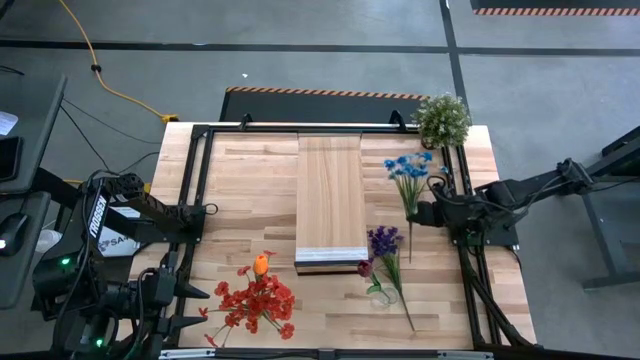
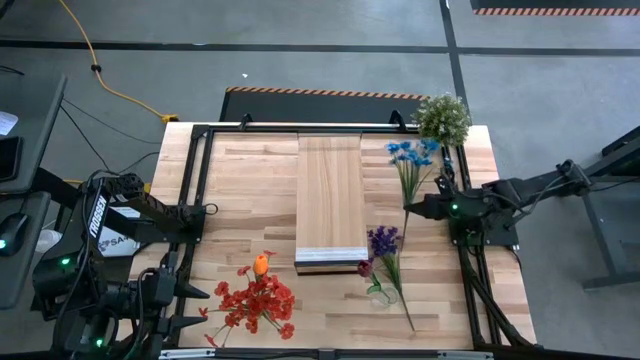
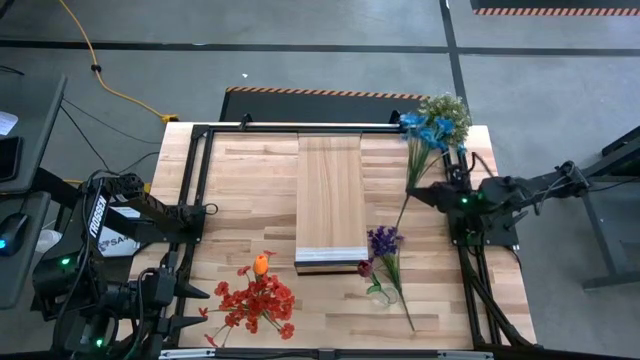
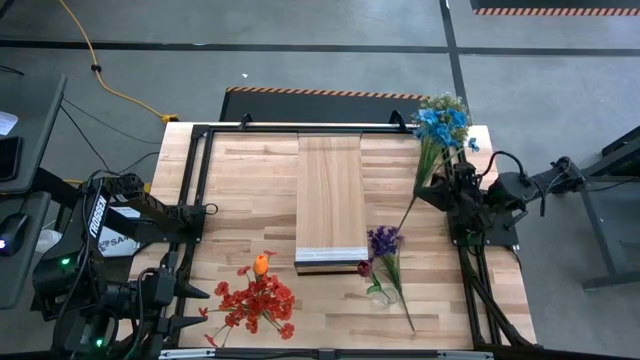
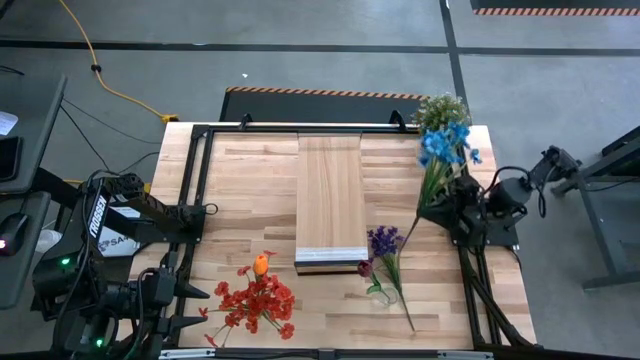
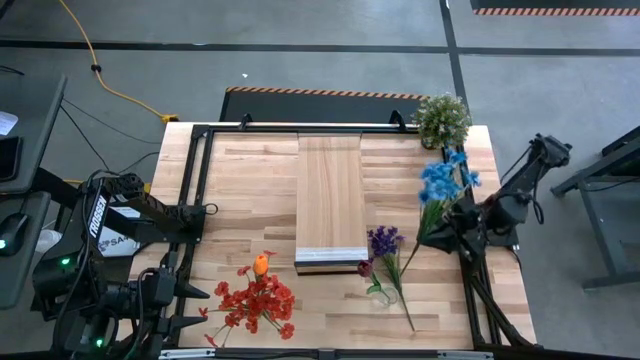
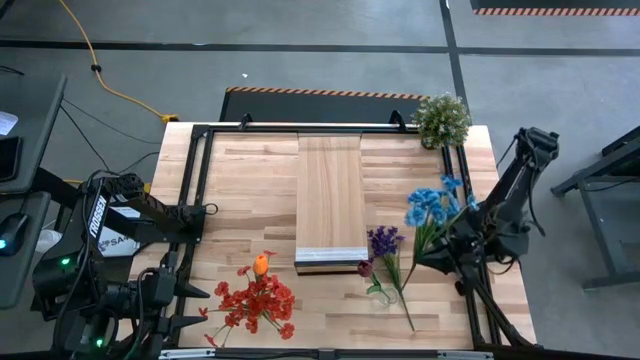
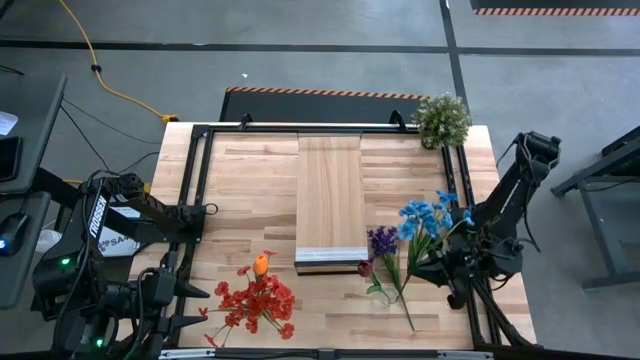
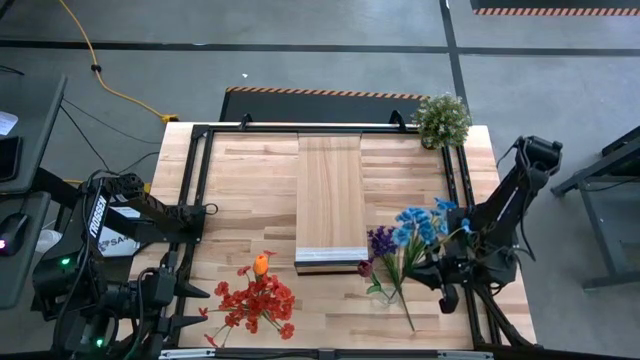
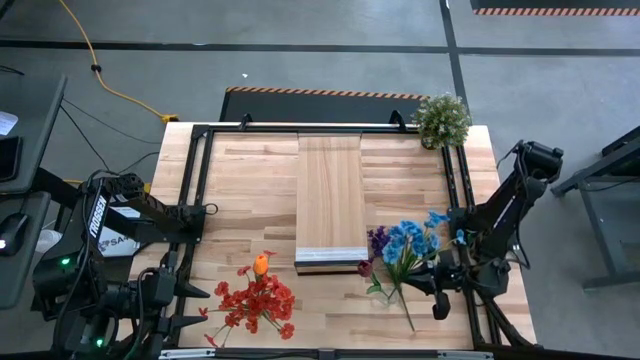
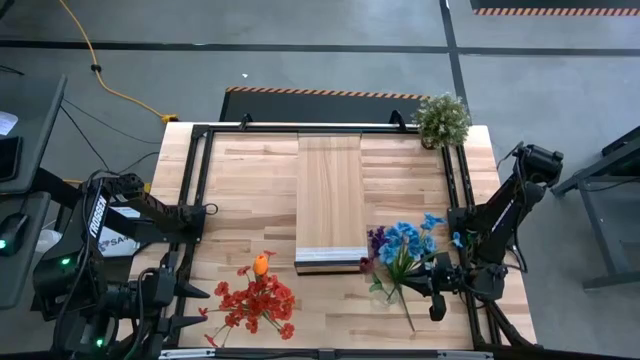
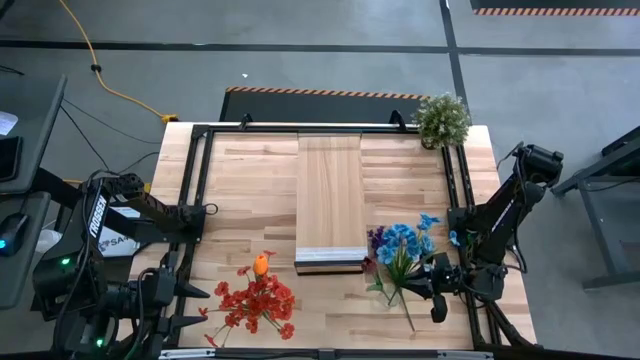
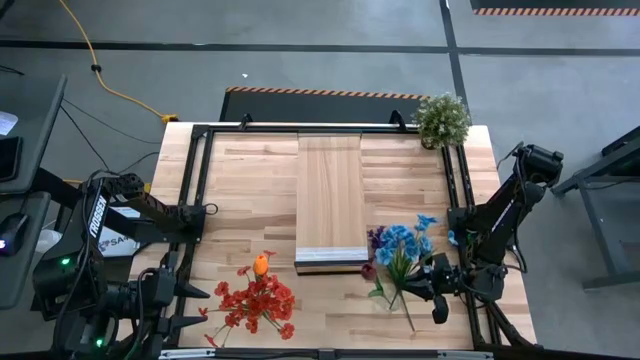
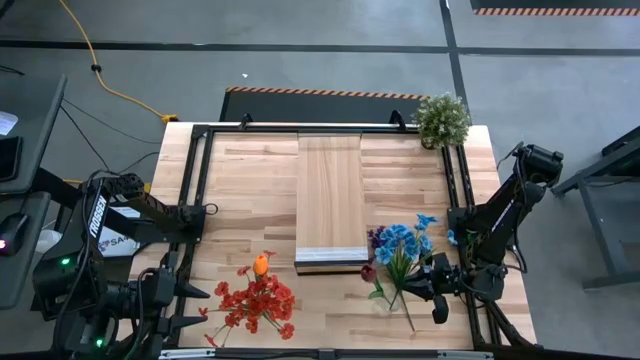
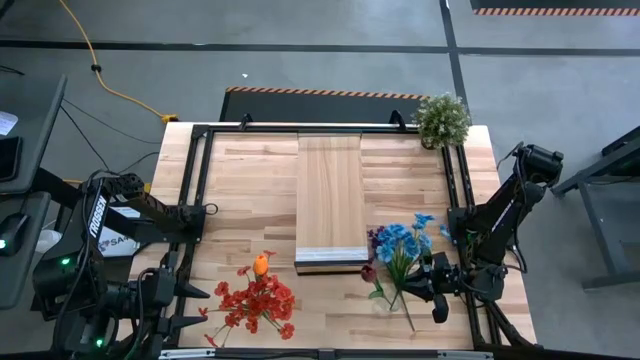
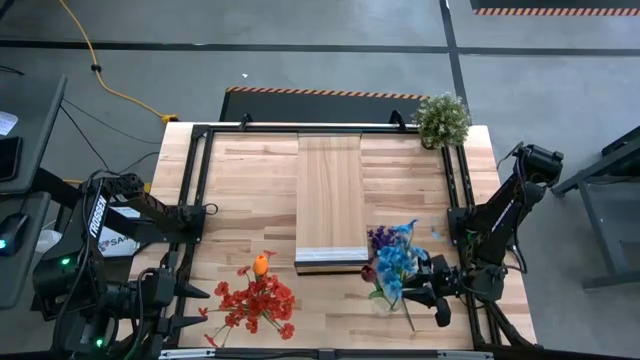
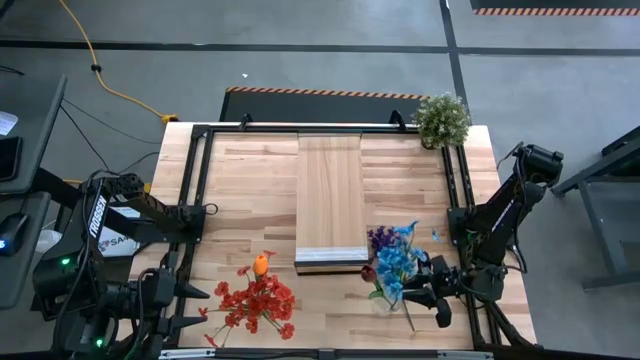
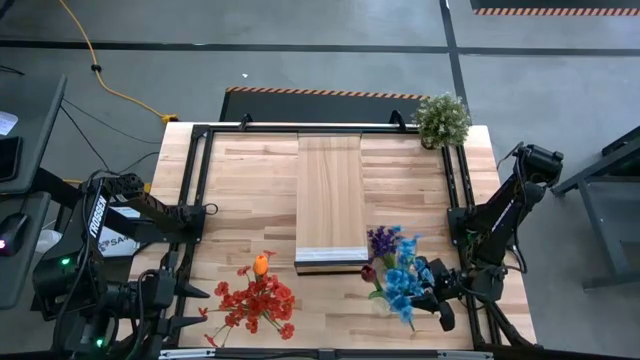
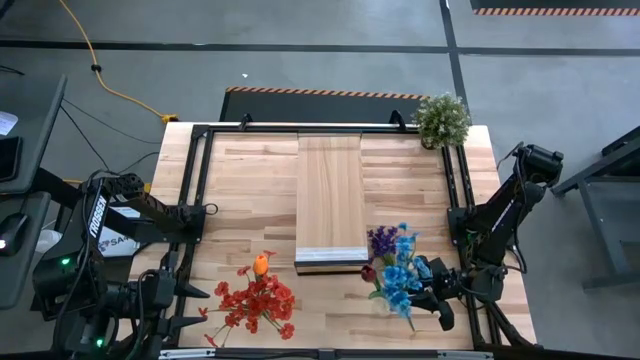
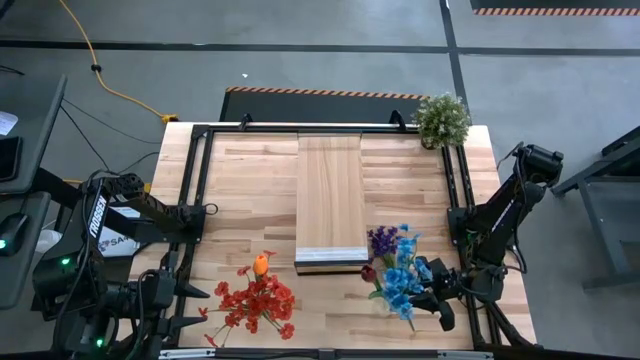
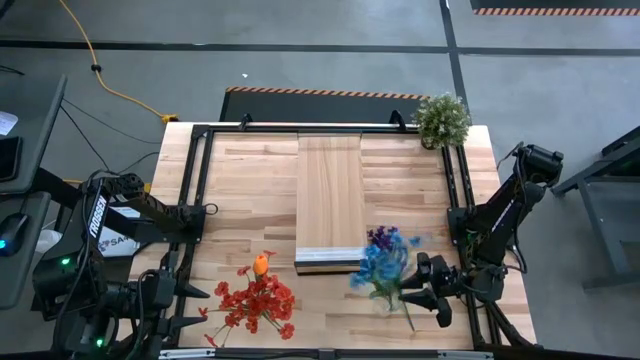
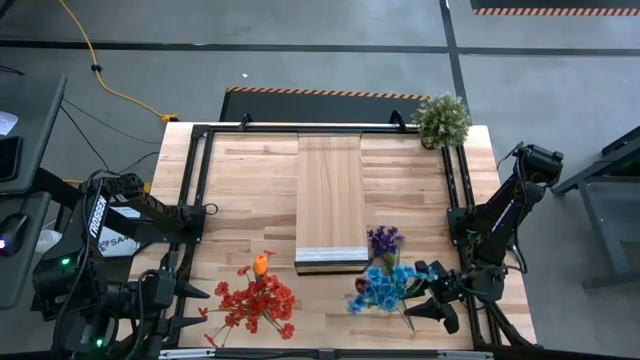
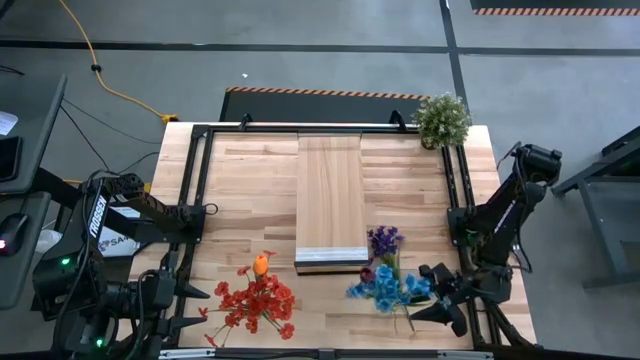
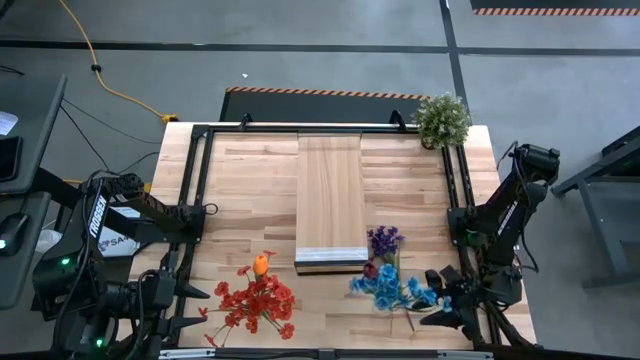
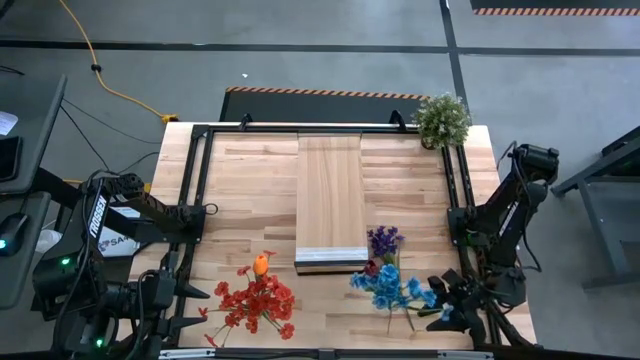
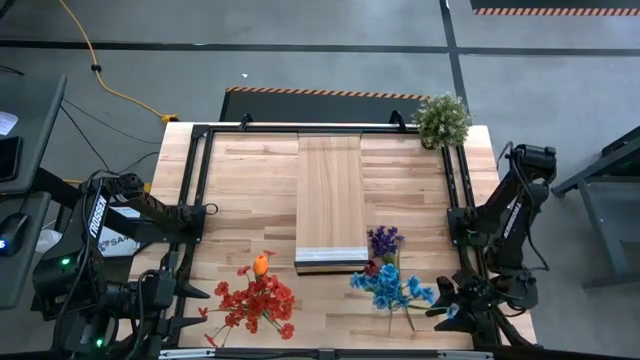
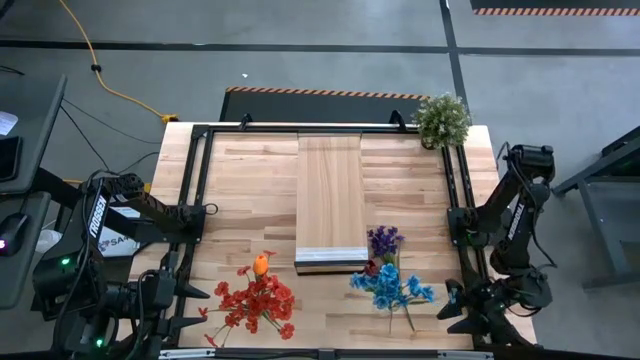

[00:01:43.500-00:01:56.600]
Task: Pick and place flowers into a vace then onto a shelf
Put the blue flowers into the right transparent vase

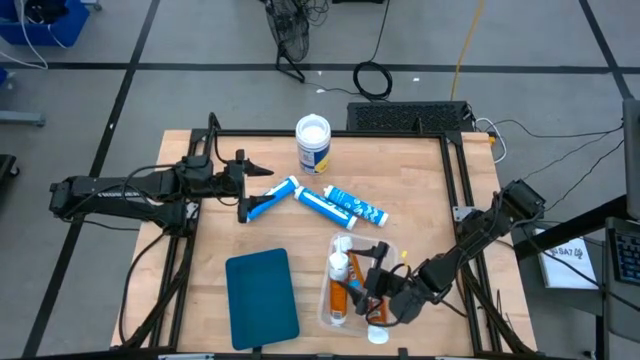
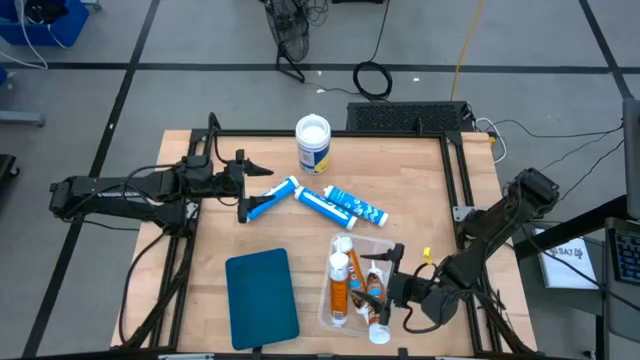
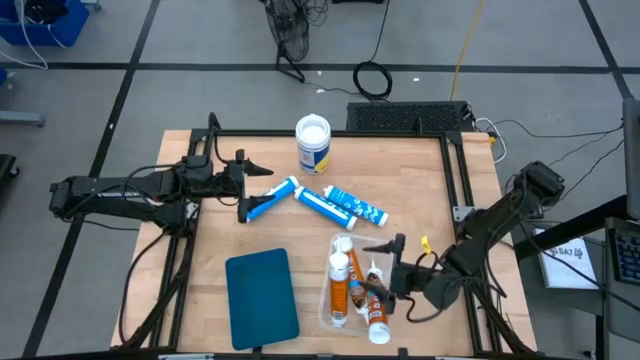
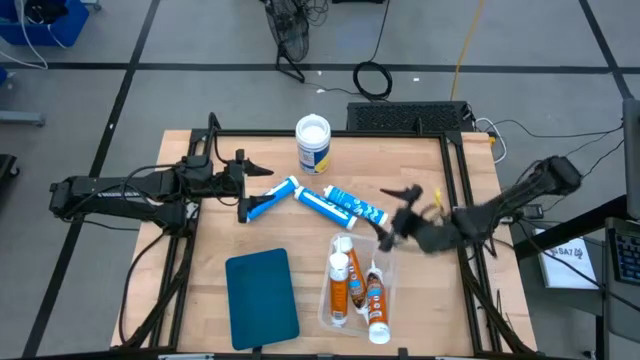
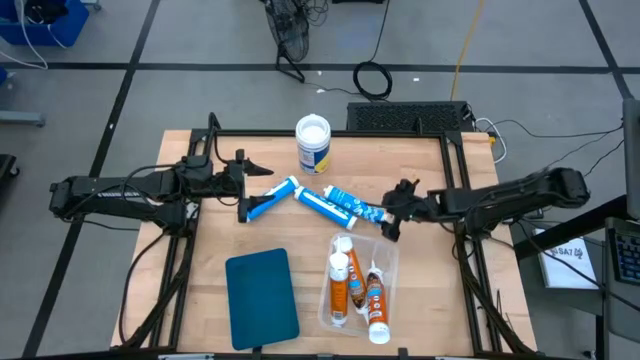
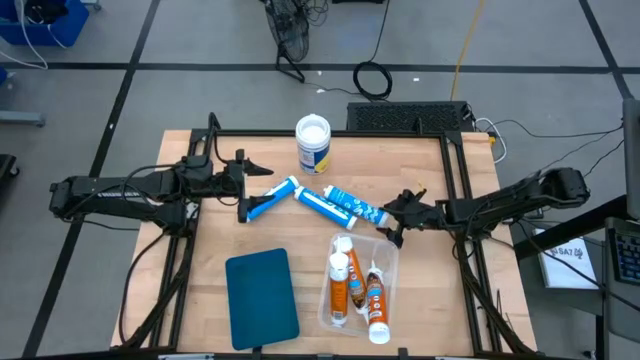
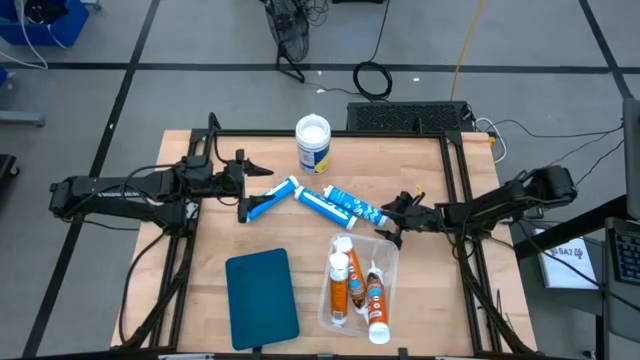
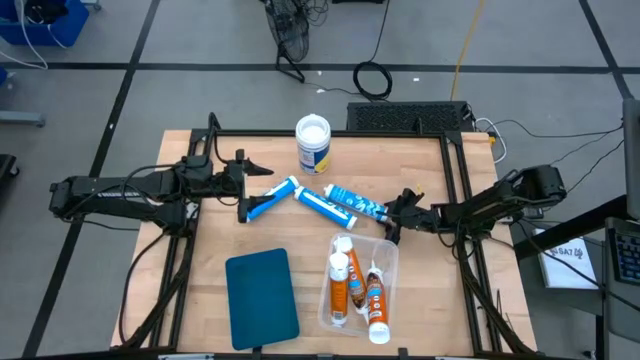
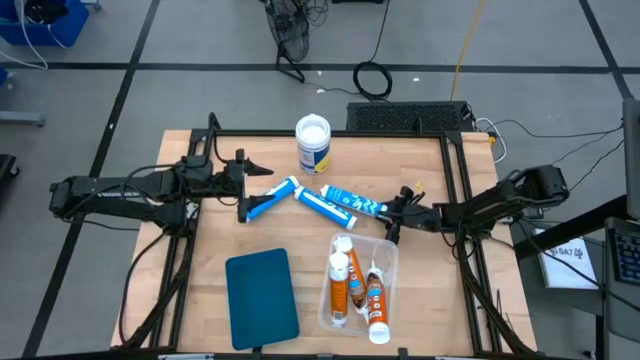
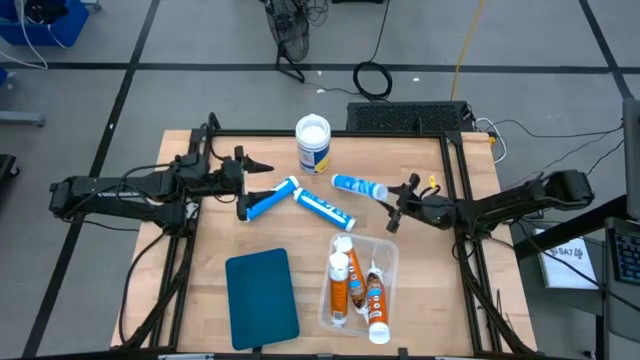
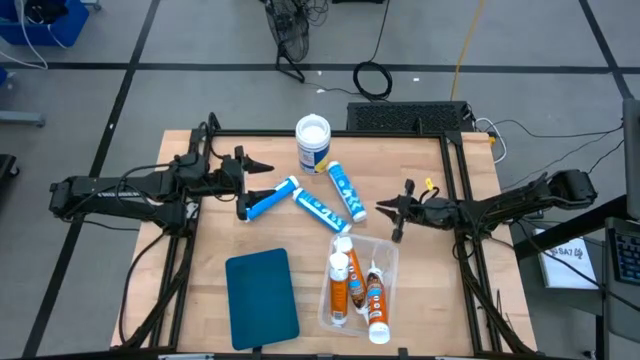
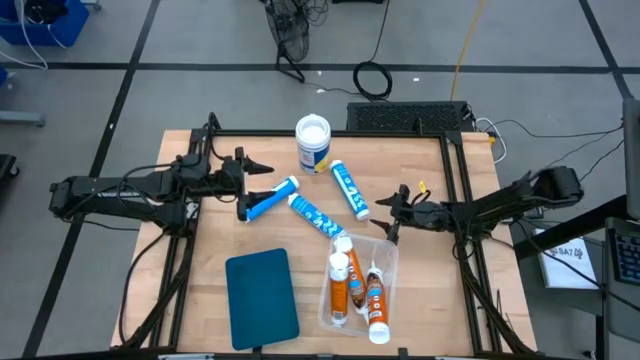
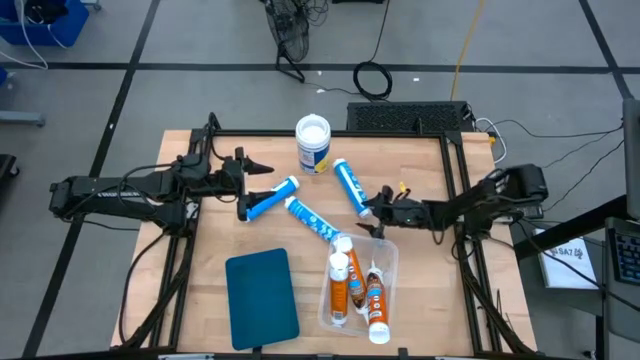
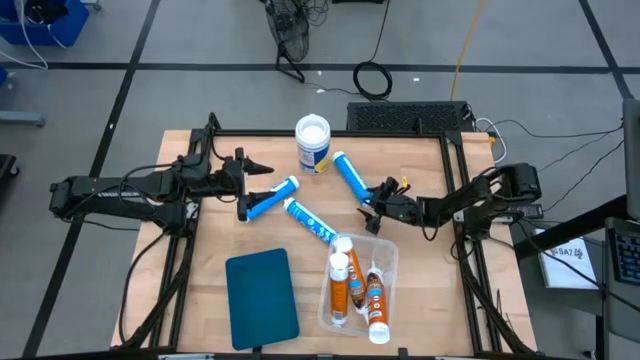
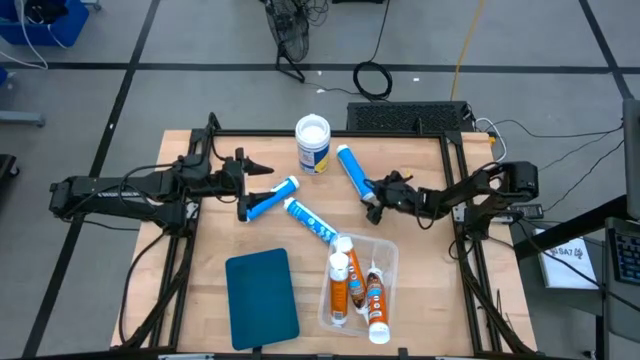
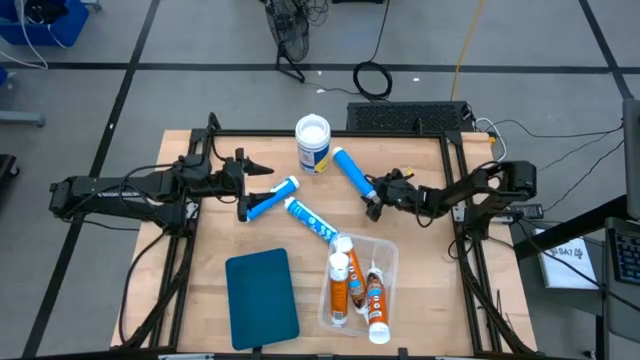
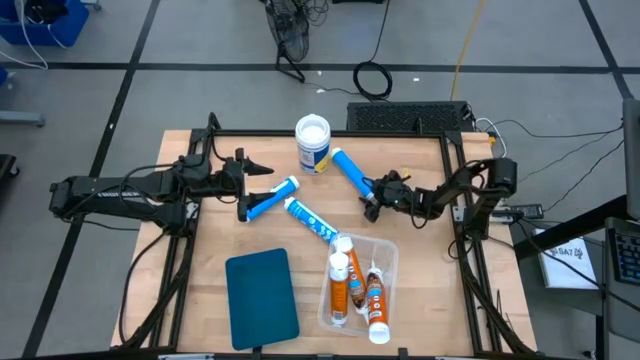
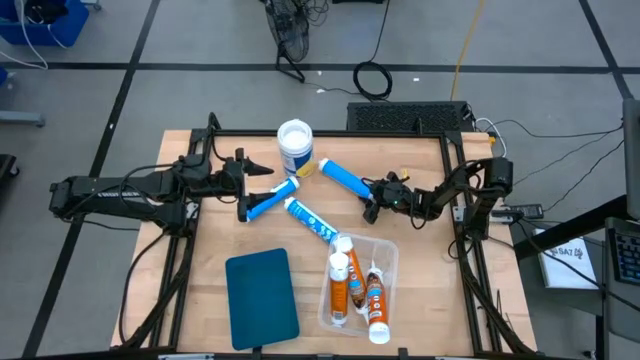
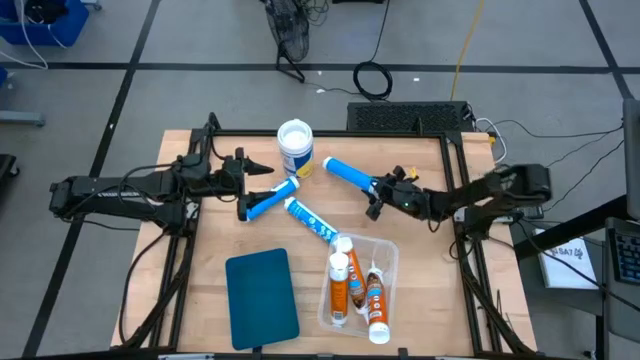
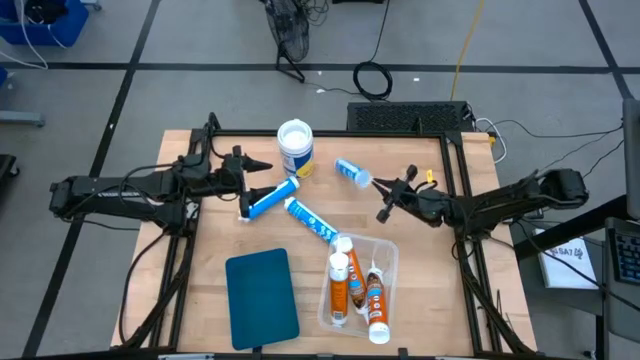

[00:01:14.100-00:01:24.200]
Task: Pick & place silicon tubes, Sealant and Lysol wipes
Put the right blue sealant into the blue bin
